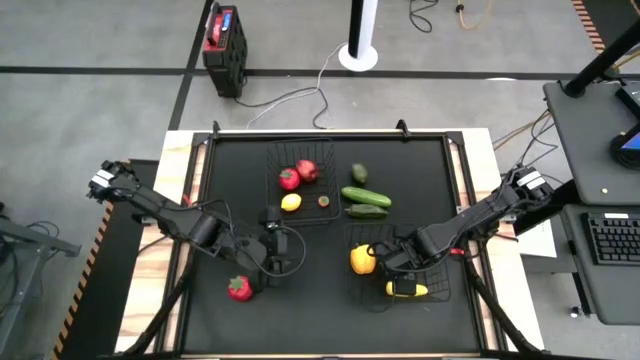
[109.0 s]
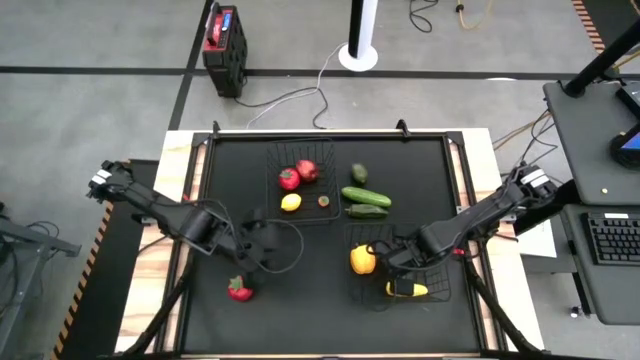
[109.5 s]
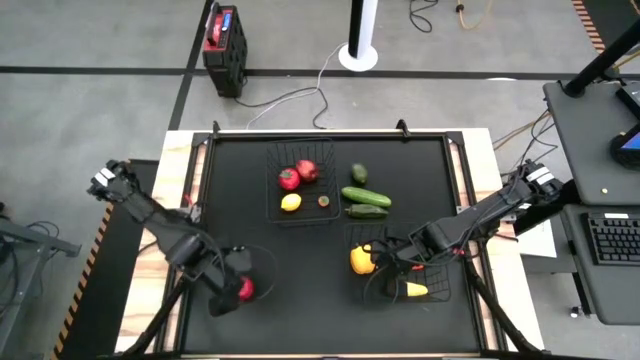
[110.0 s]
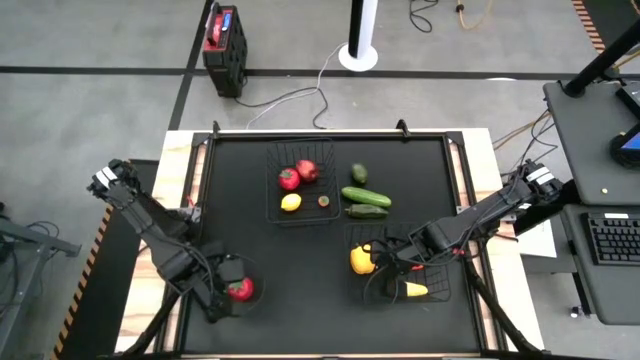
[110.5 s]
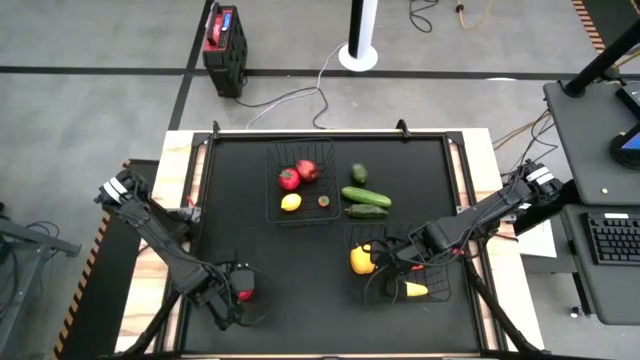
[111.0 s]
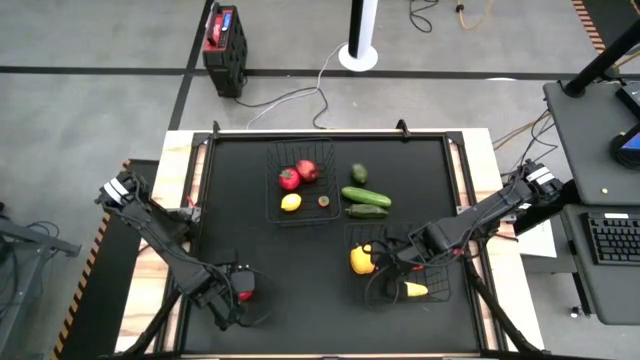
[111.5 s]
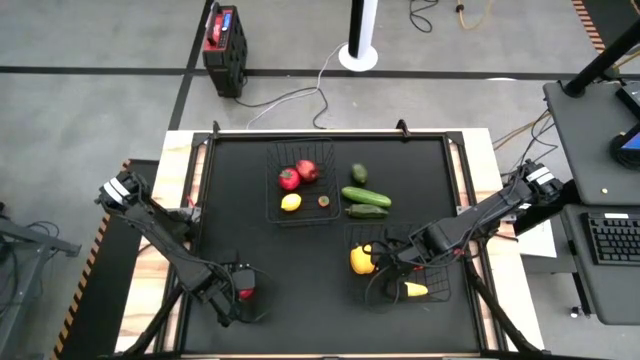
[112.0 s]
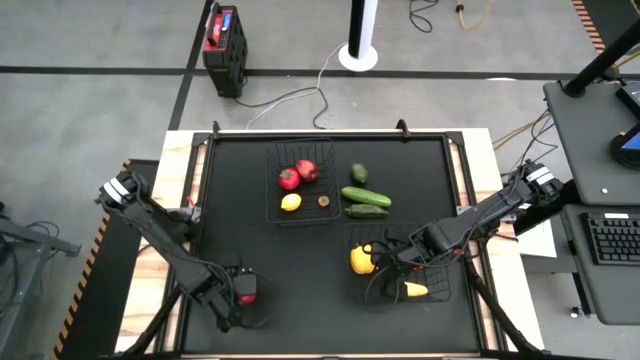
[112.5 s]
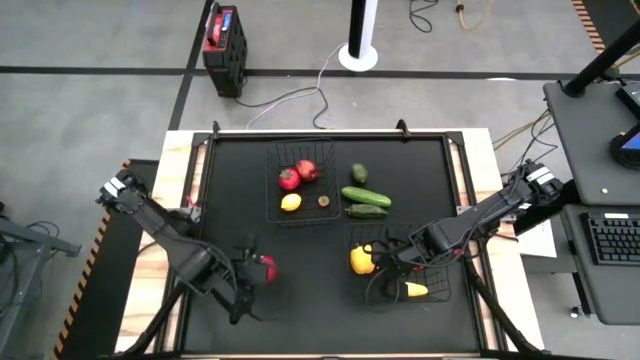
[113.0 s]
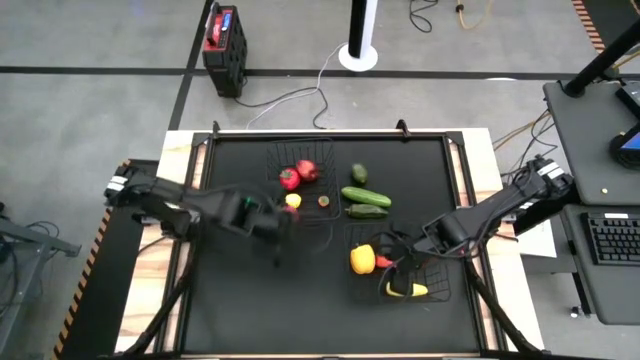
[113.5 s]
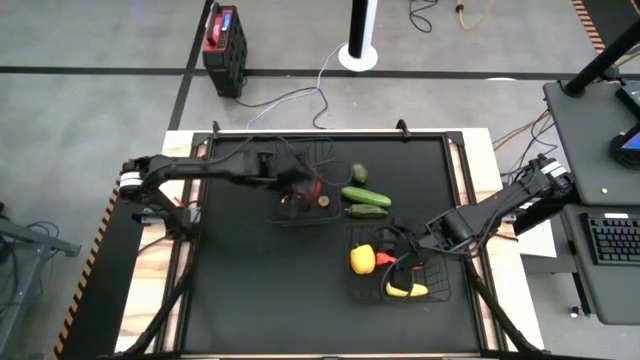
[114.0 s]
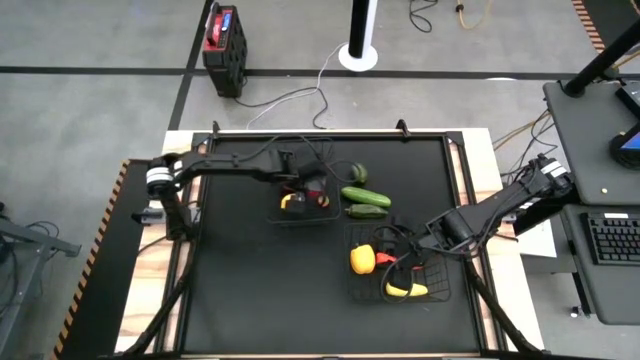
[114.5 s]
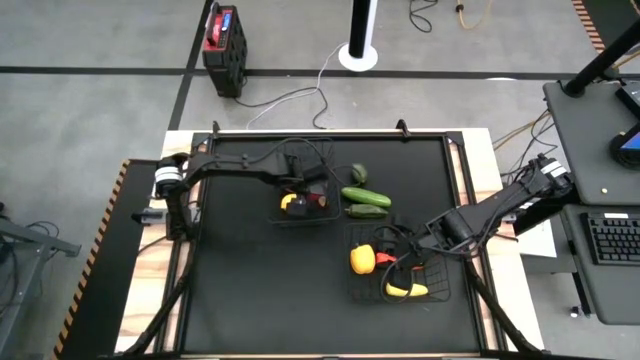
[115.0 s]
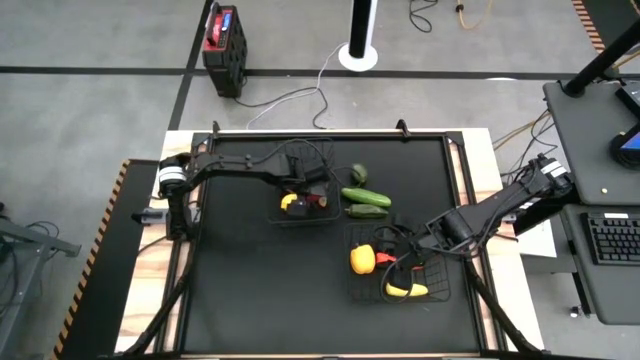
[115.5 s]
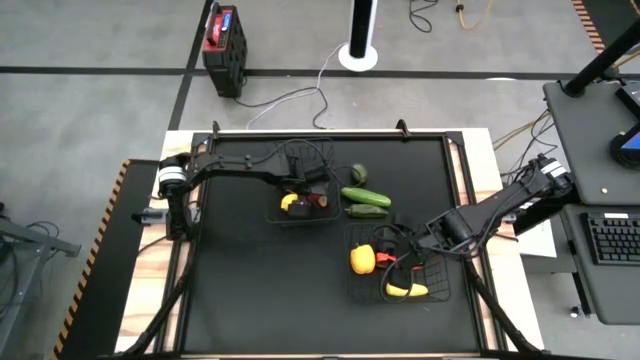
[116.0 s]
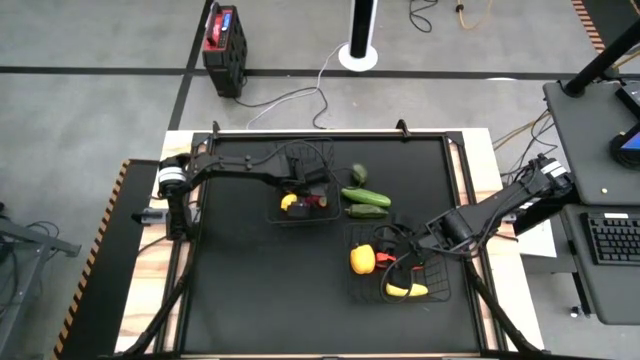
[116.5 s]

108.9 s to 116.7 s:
Task: Sort produce into baskets
Put the tomato into the top black wire basket

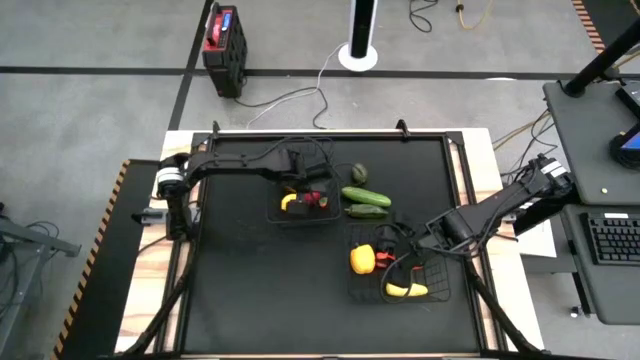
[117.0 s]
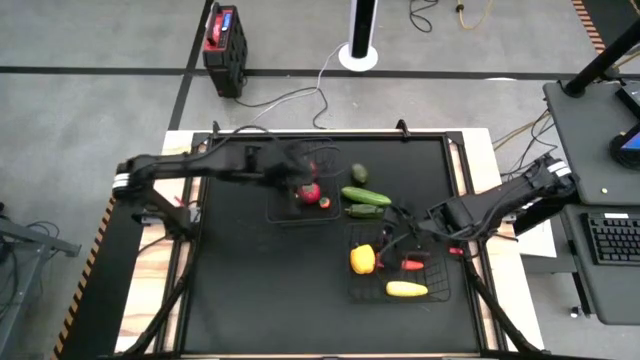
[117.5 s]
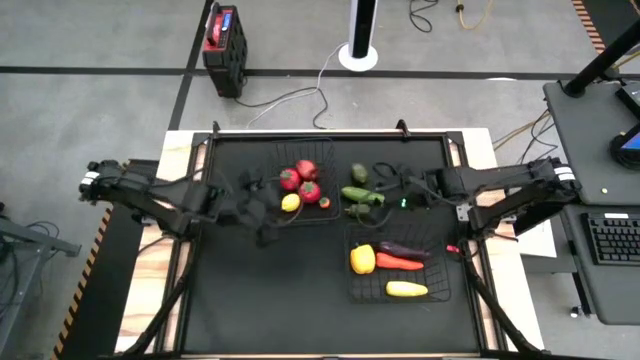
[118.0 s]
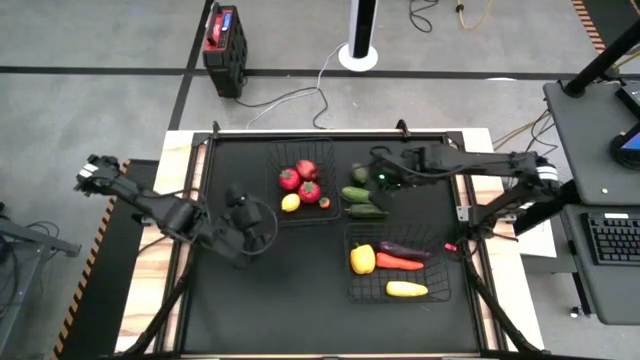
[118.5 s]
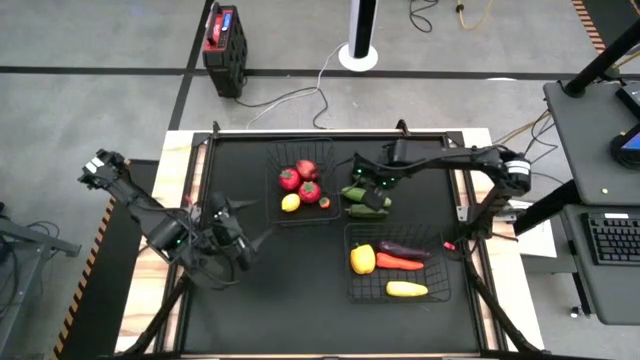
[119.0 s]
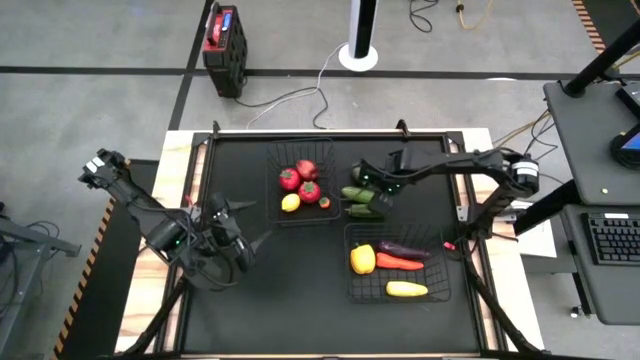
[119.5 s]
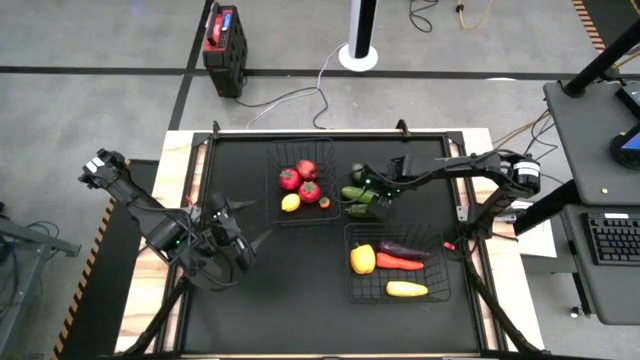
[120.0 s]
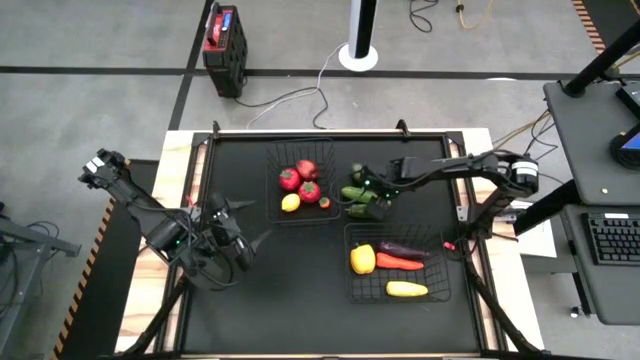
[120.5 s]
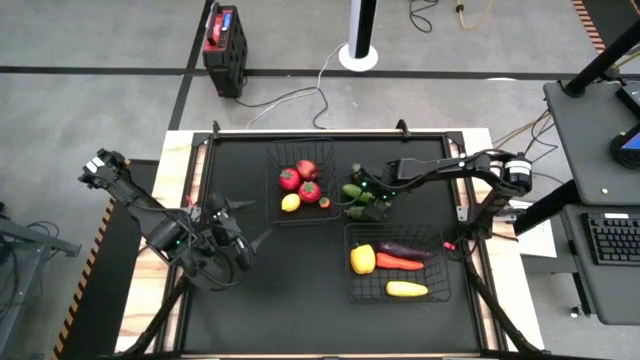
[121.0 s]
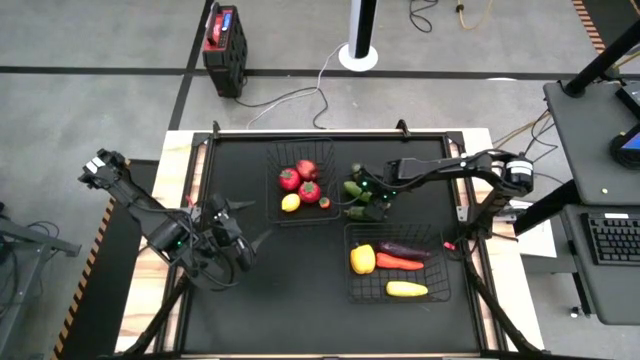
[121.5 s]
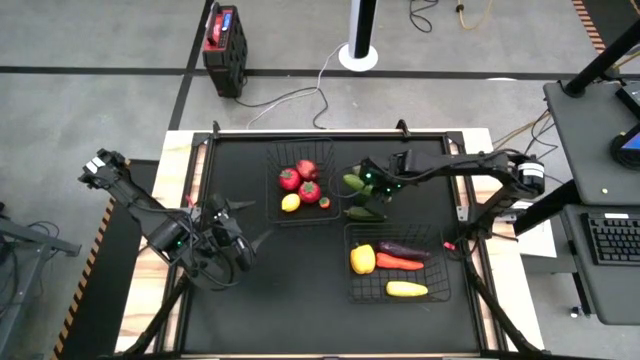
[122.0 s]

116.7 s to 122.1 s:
Put the cucumber into the bottom black wire basket

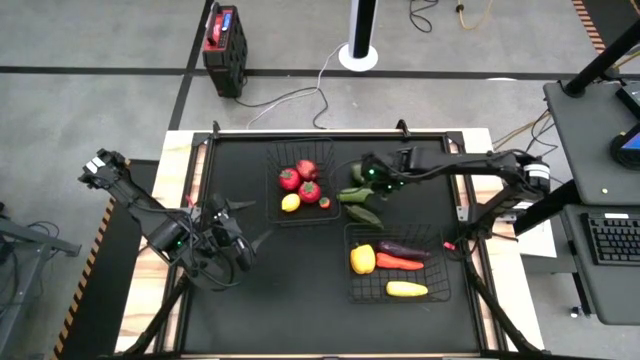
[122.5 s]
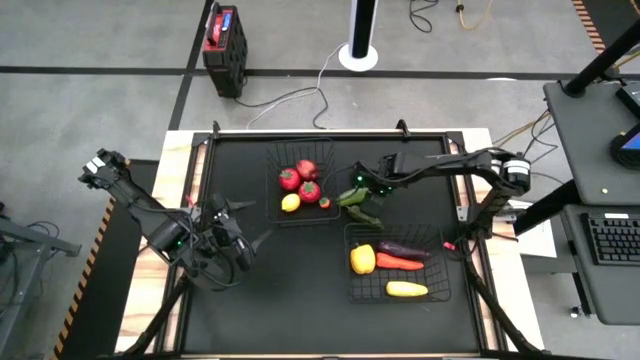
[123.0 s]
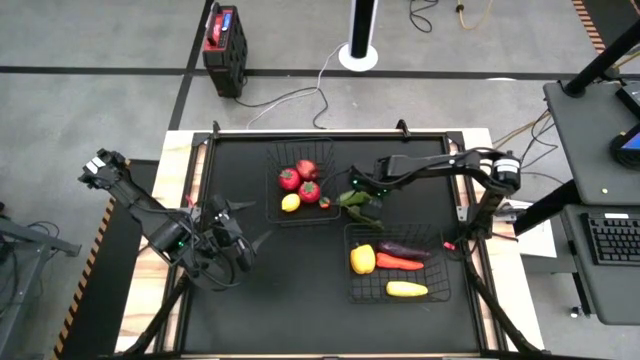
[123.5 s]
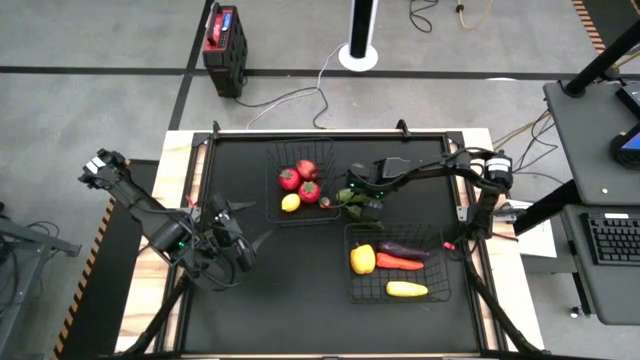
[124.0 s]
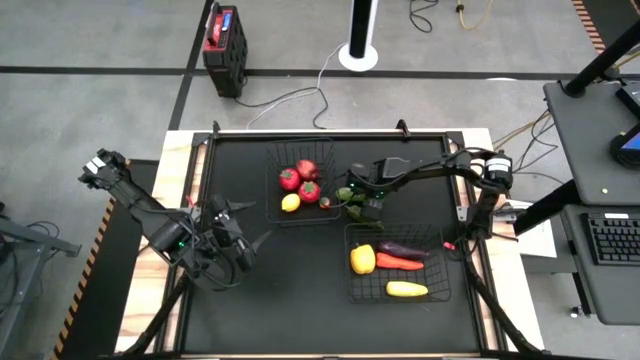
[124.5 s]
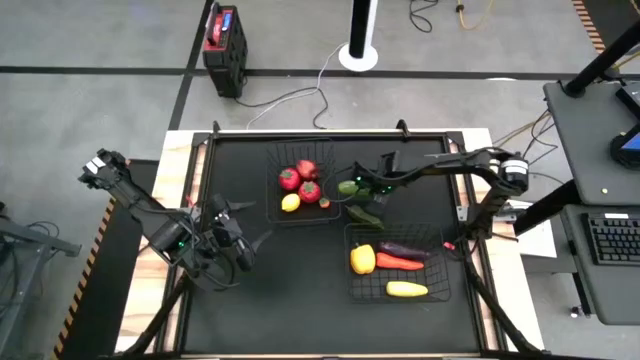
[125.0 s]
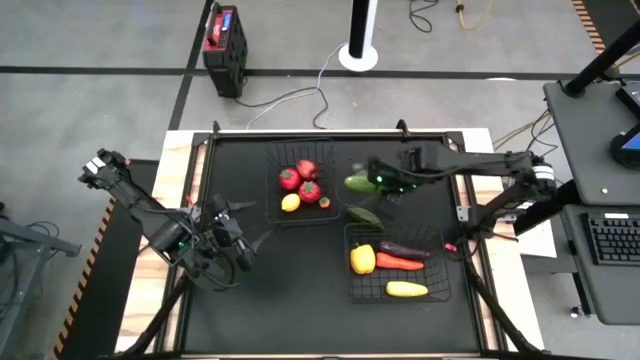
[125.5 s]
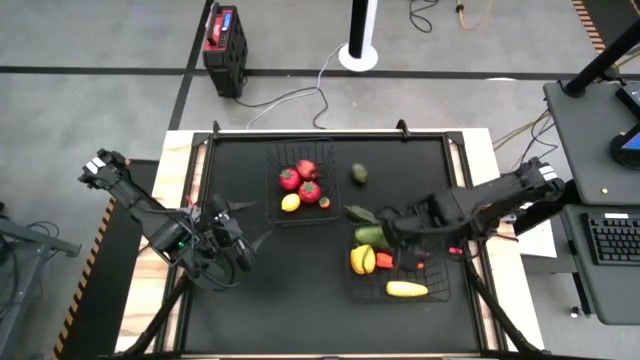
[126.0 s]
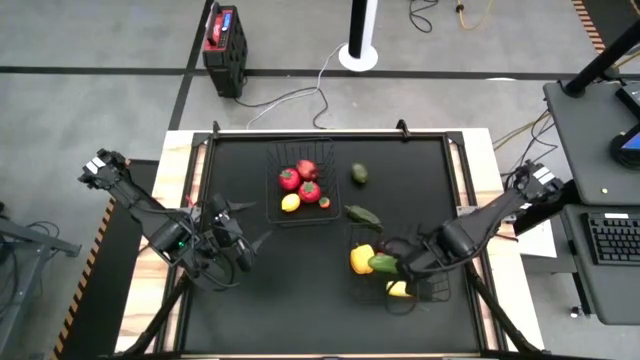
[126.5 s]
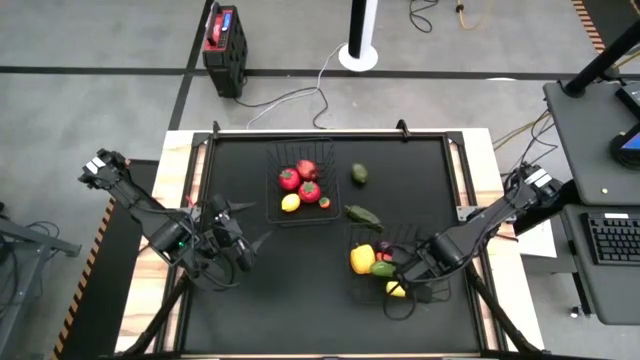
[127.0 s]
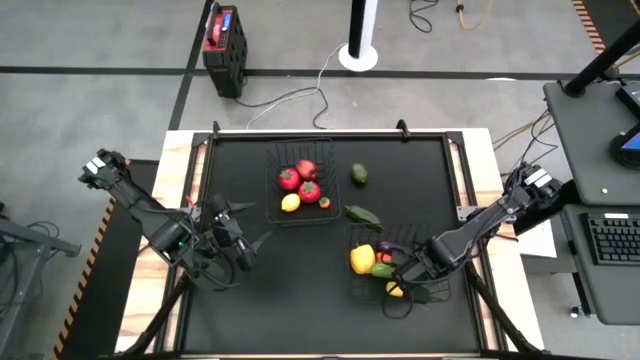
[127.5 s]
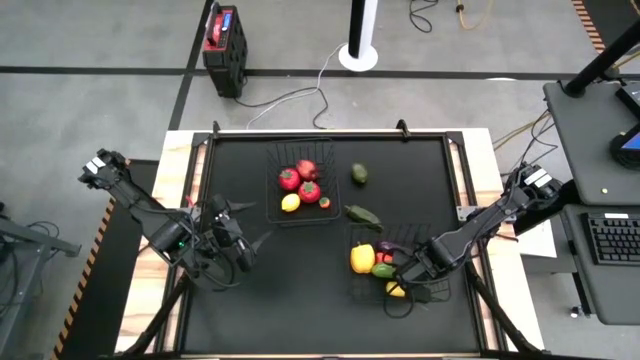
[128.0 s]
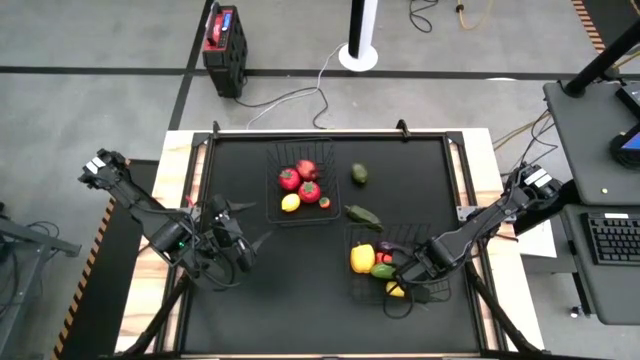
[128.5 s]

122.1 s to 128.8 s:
Put the cucumber into the bottom black wire basket

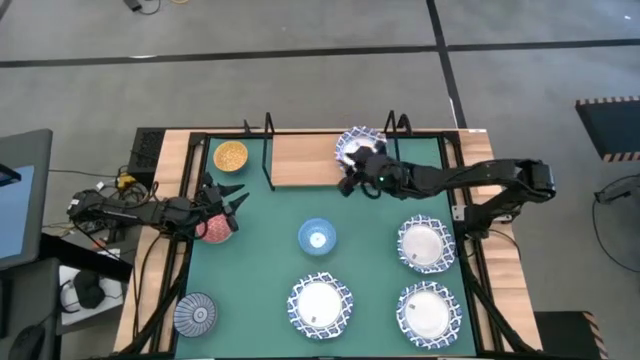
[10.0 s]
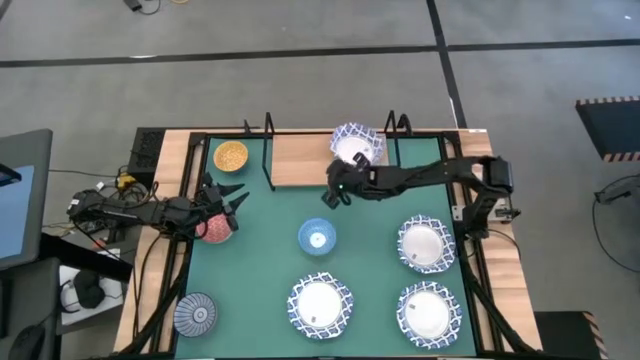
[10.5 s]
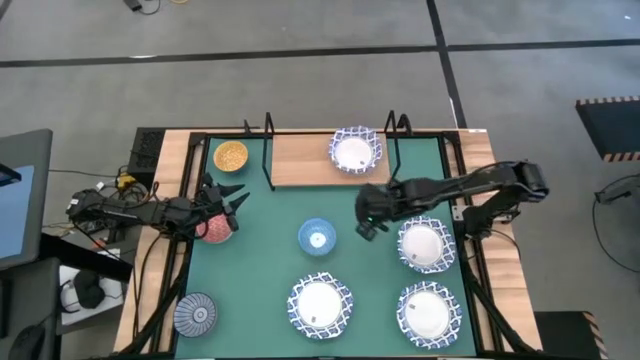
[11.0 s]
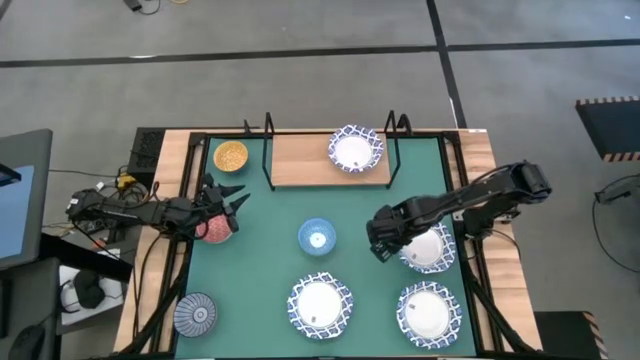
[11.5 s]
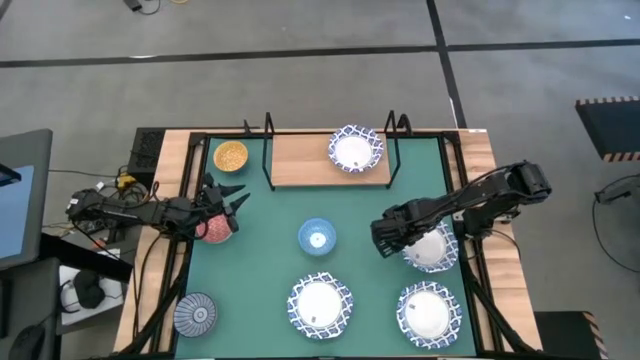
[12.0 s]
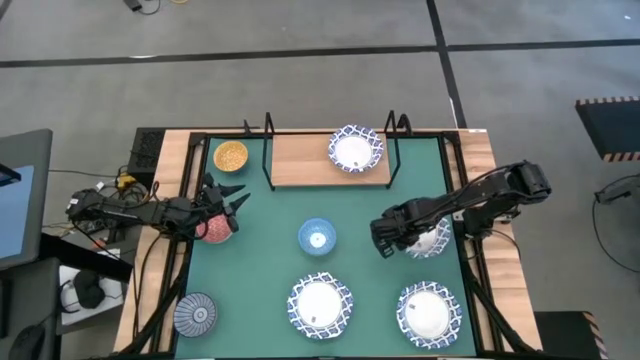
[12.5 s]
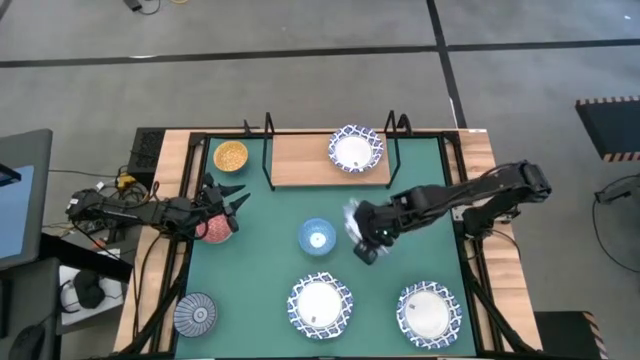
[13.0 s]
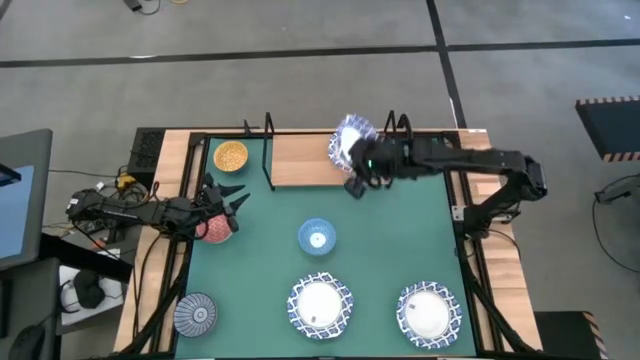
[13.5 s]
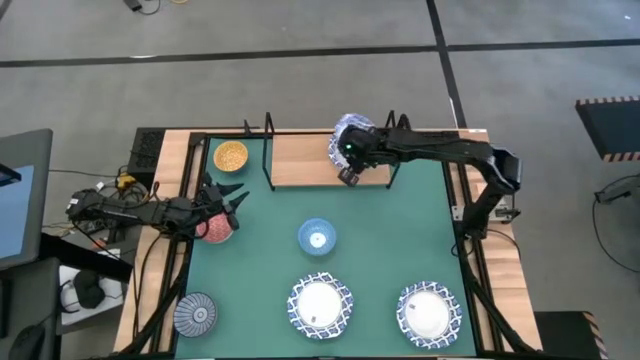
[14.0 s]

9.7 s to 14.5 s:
Task: Place and stack bowls onto a shelf
Stack the white patterned bowl on top of the white patterned bowl on the shelf
